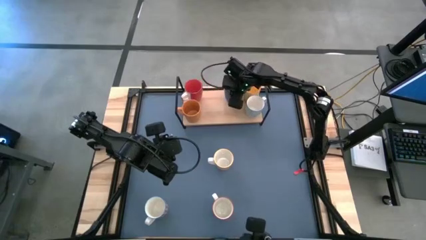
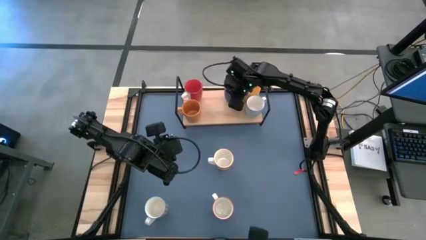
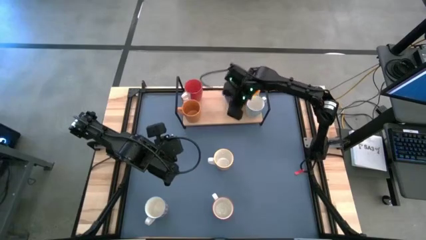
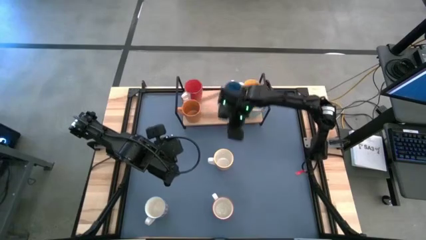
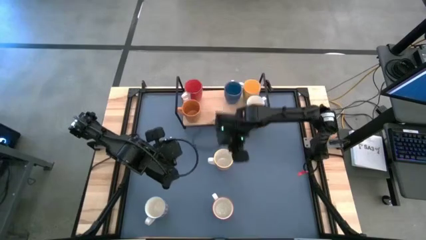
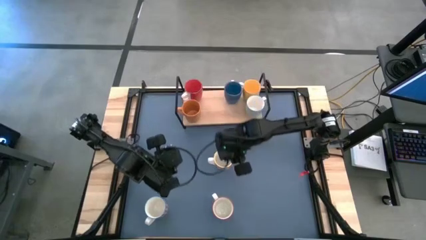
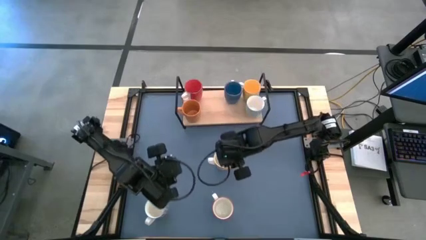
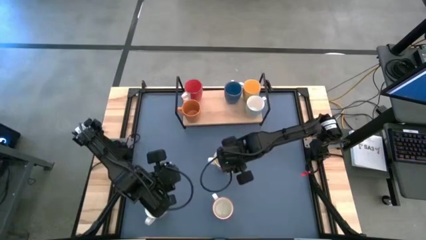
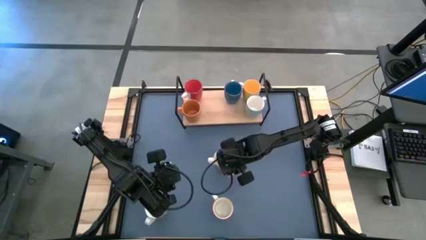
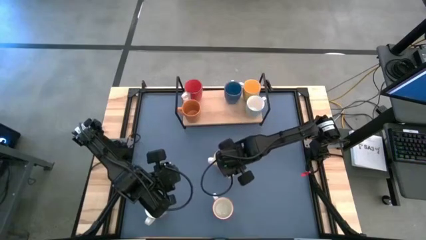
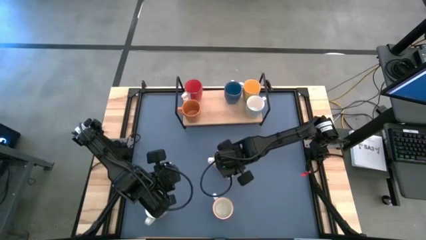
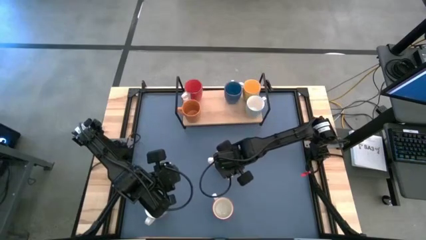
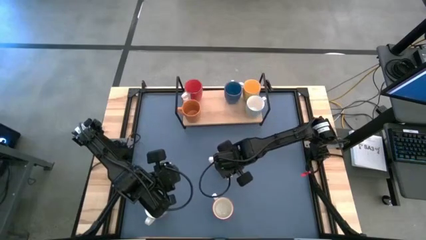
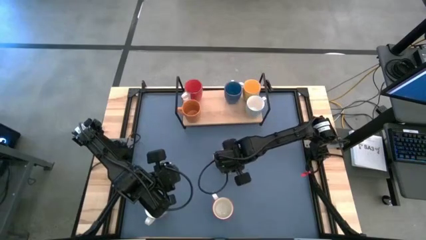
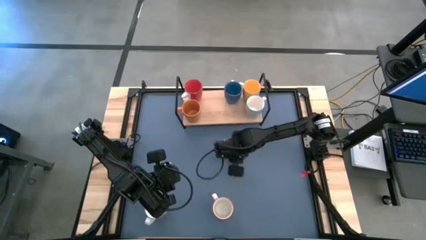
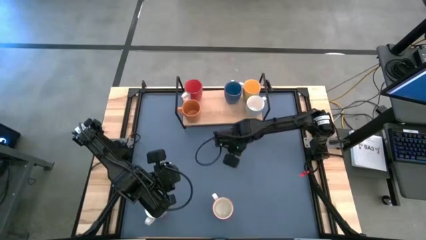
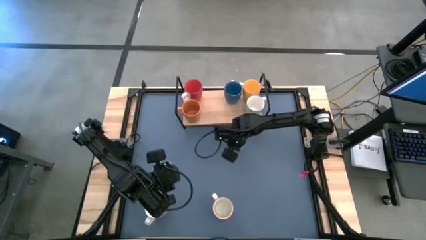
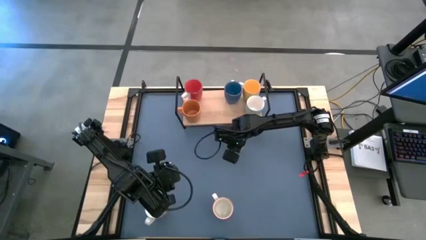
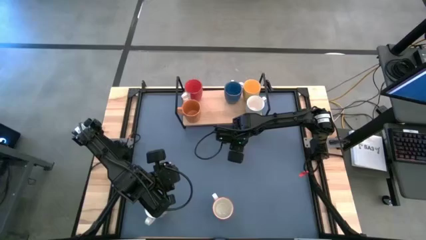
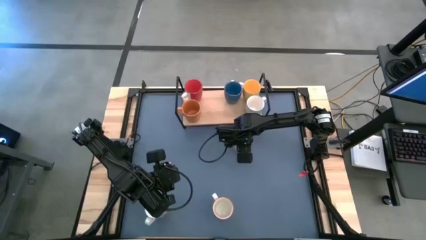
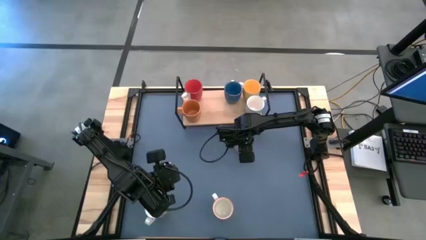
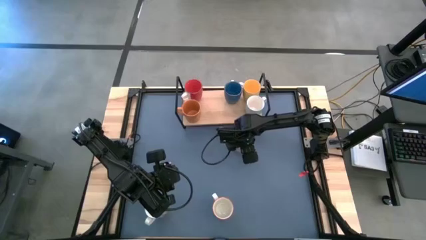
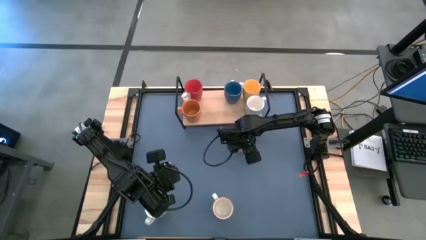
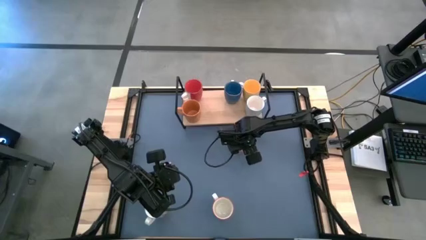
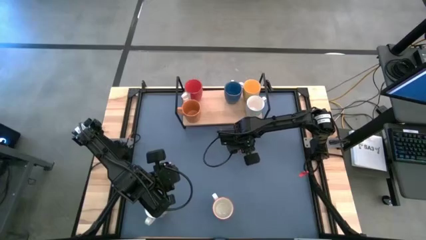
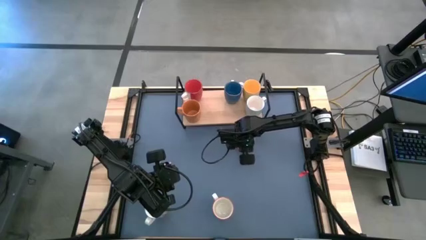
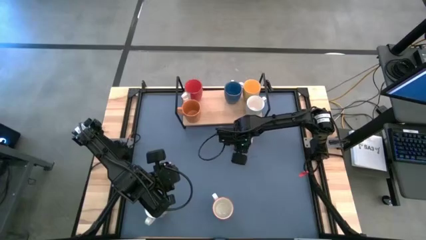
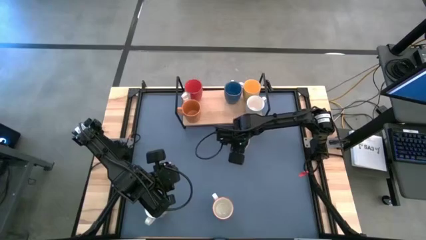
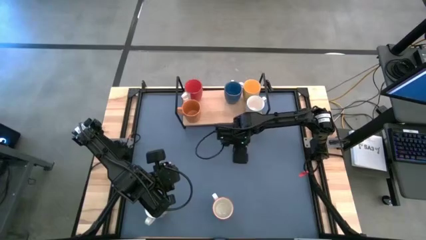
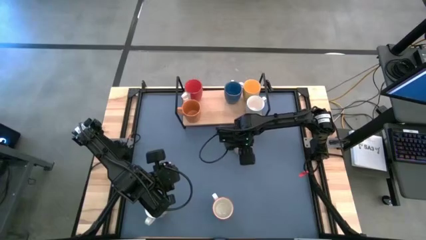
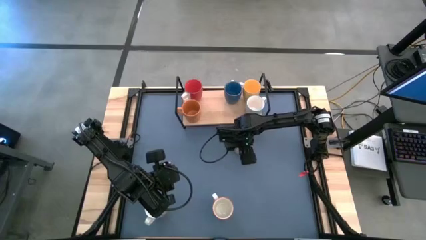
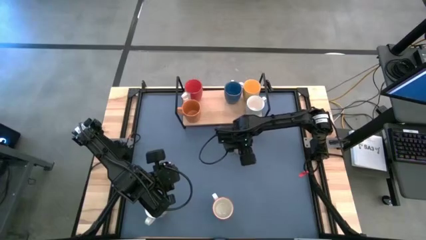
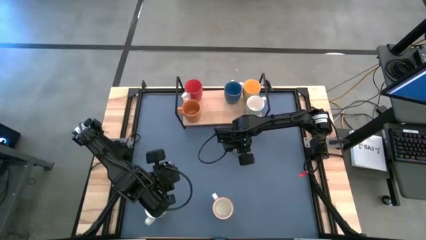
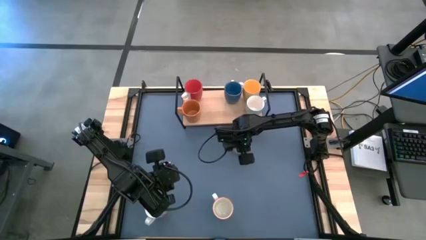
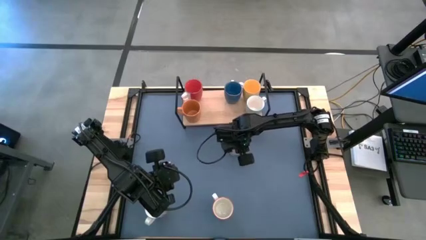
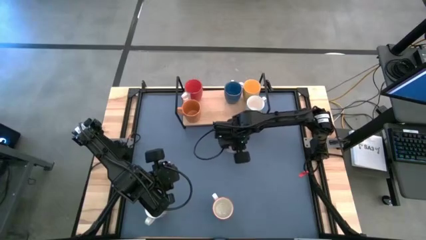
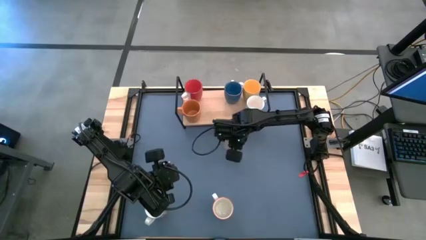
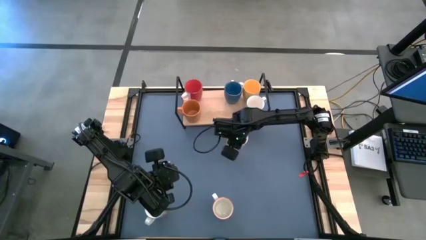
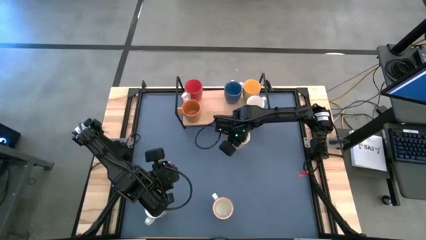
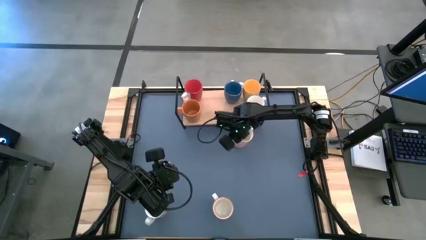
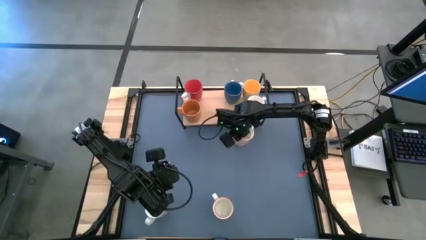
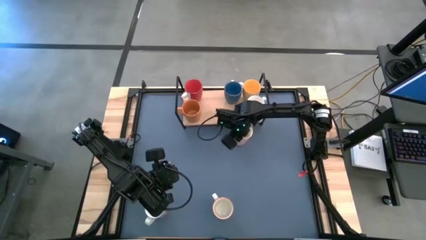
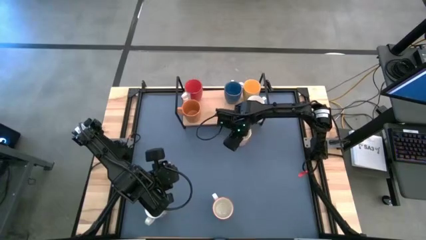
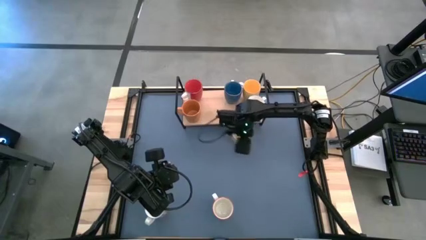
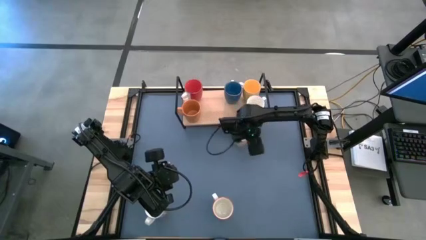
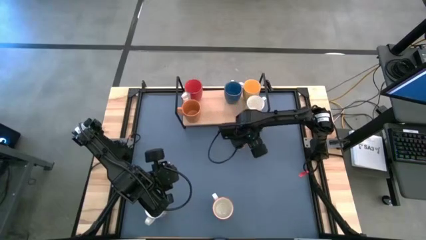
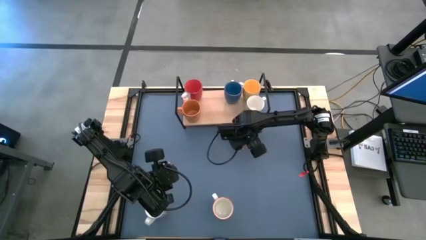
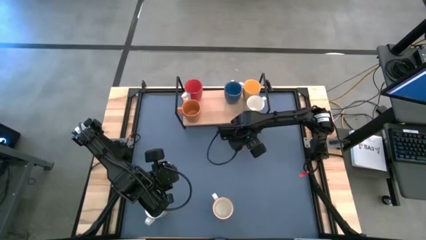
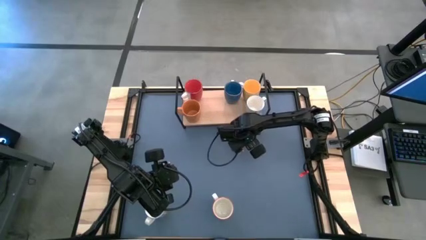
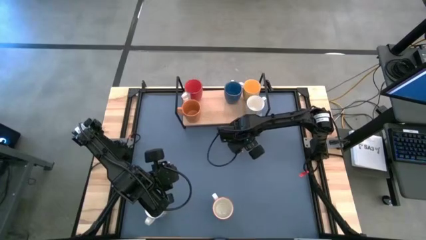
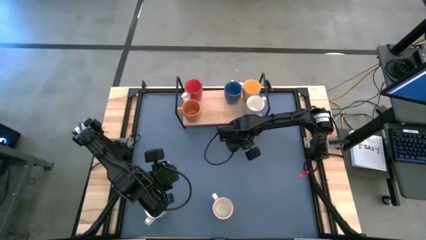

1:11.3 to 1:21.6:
Task: Place coffee mugs
Put the white cup on the shelf

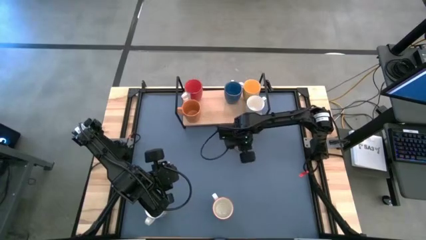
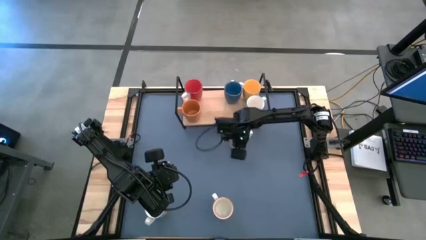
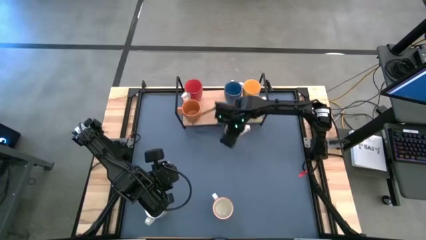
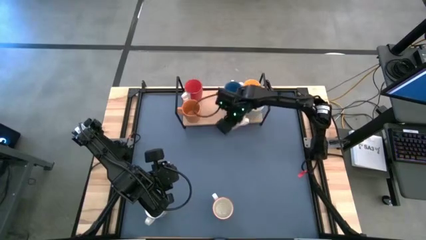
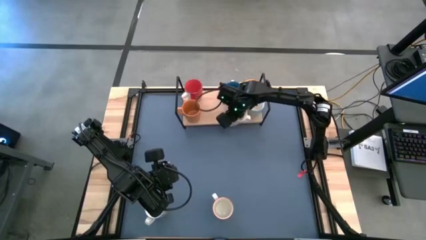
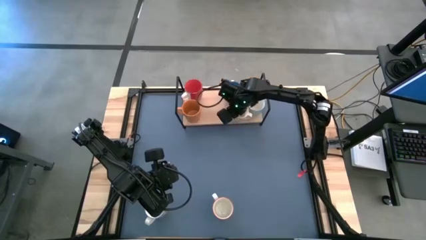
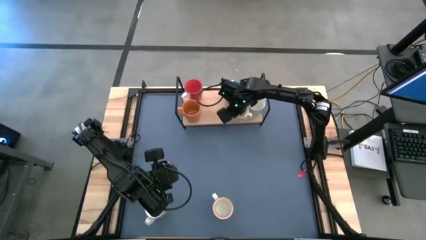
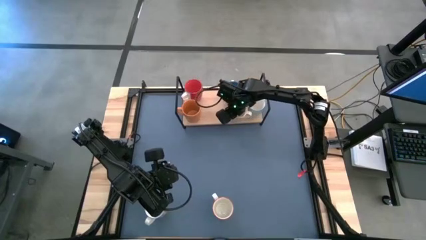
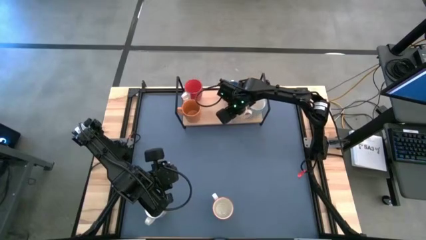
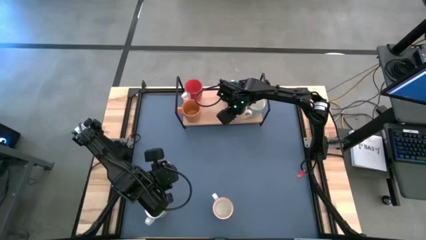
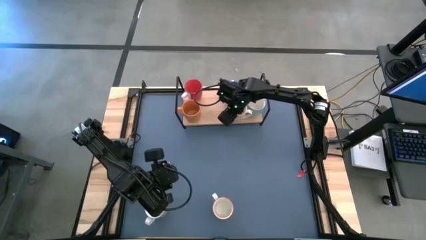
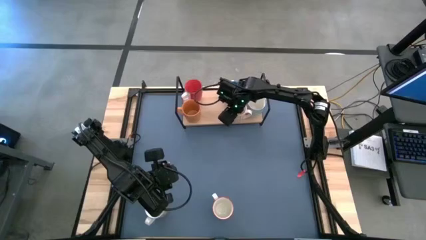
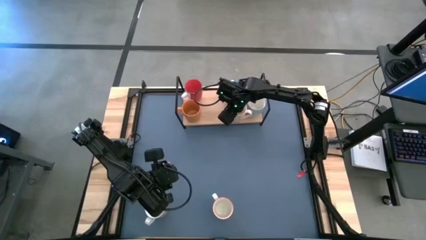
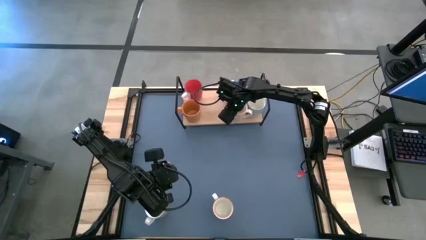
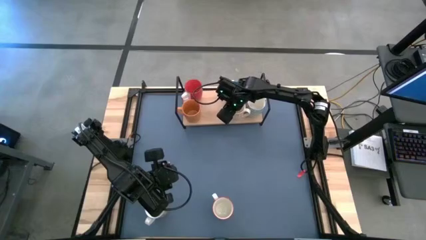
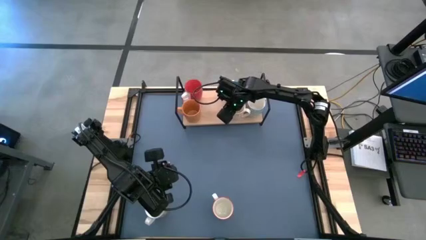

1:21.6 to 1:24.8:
Put the white cup on the shelf aligned with the other blue cup

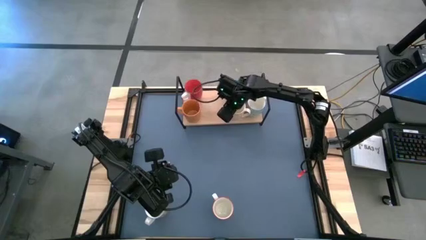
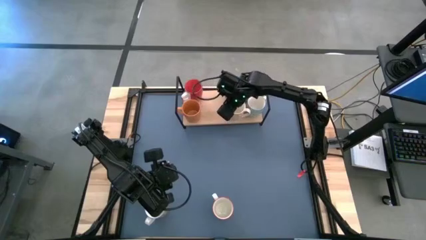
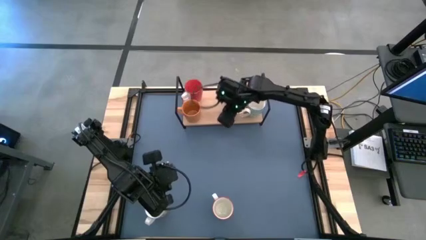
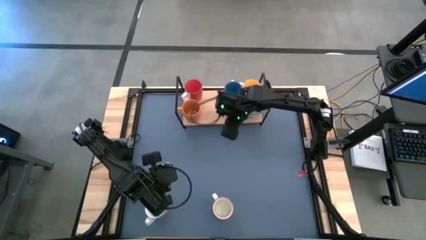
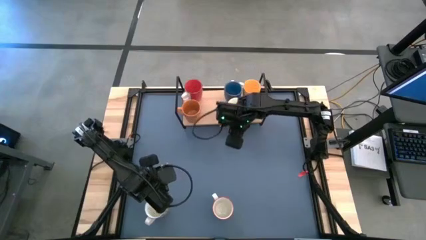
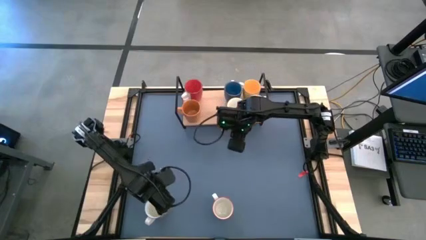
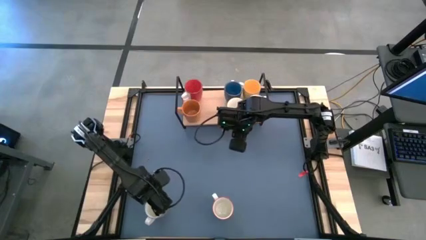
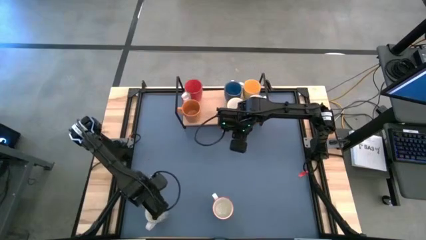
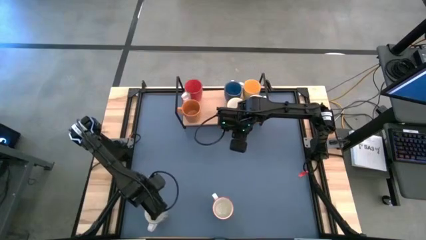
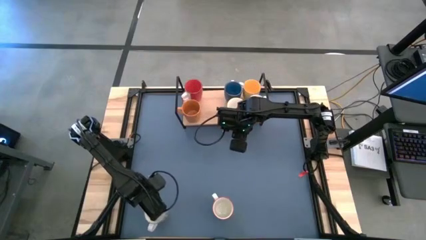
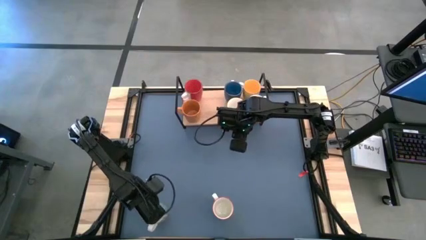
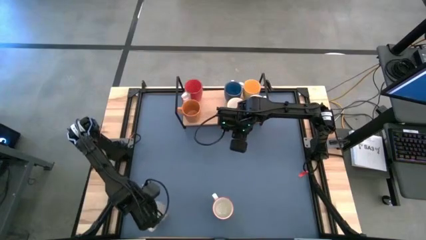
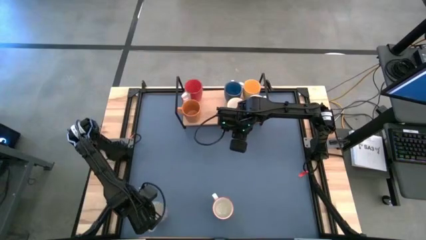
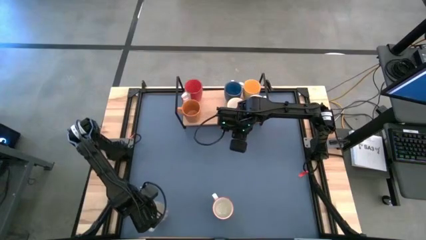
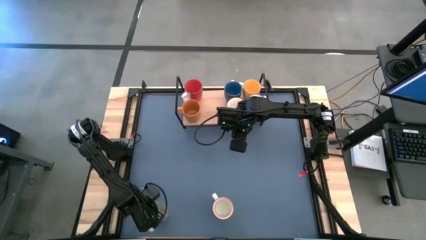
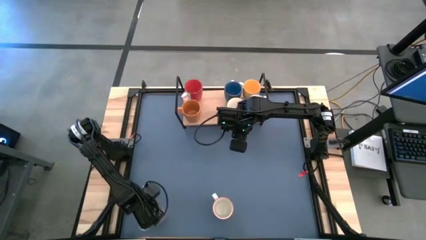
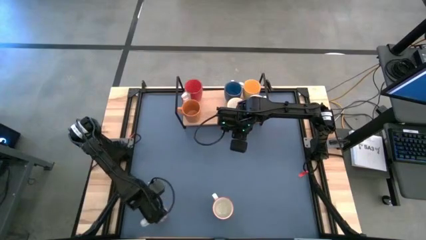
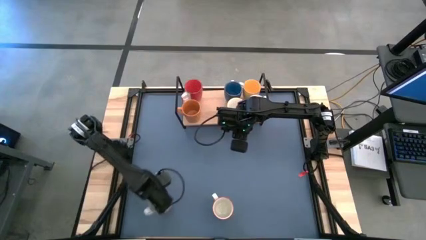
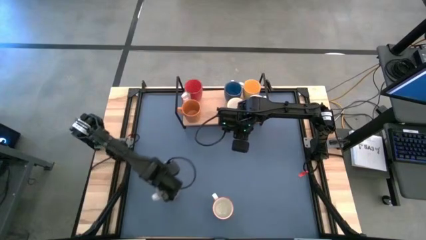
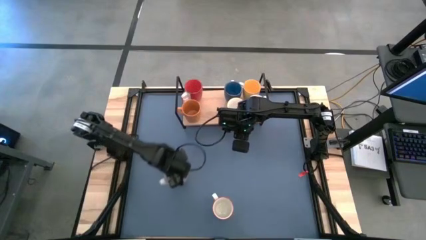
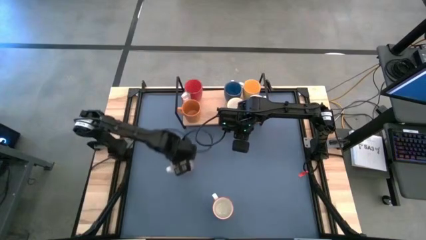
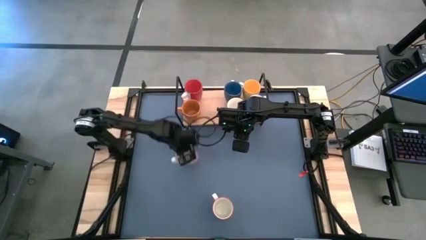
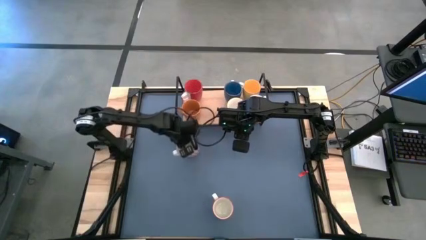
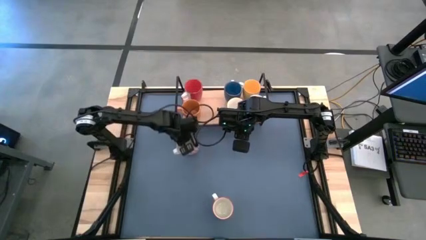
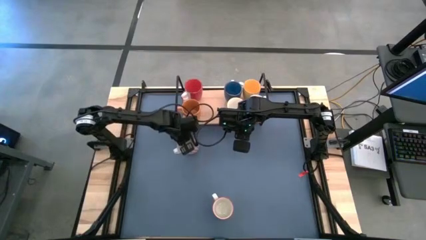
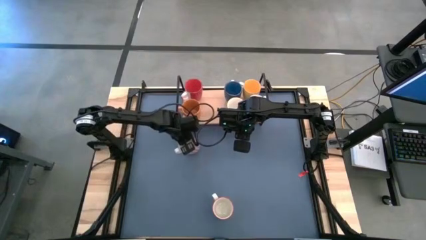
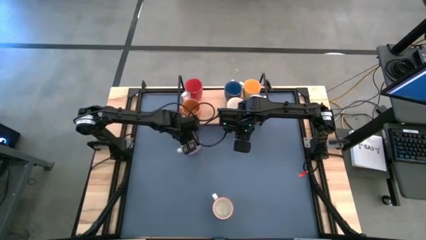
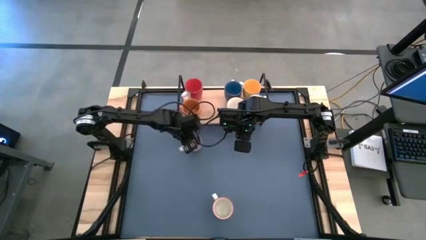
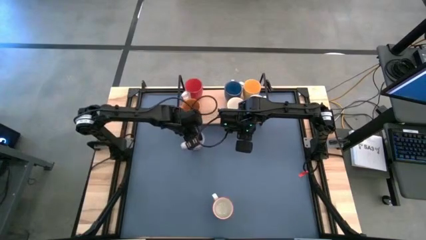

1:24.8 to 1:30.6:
Move the brown cup to the center of the table
